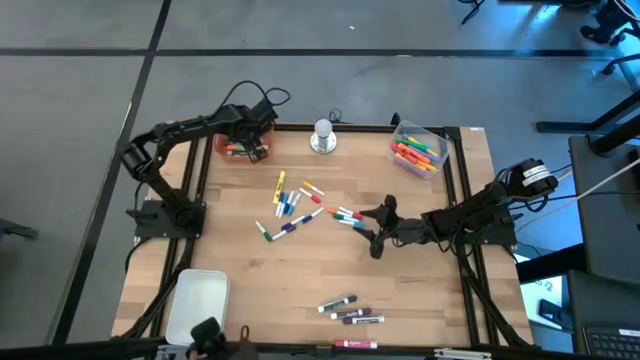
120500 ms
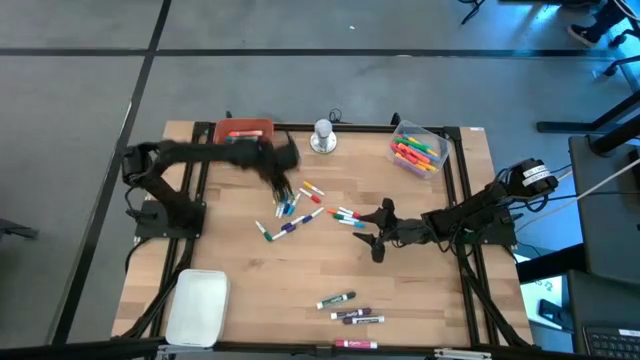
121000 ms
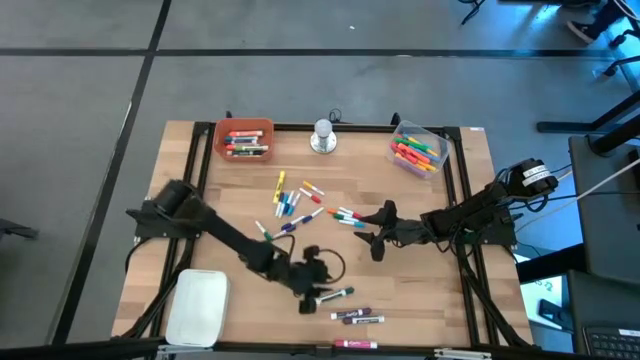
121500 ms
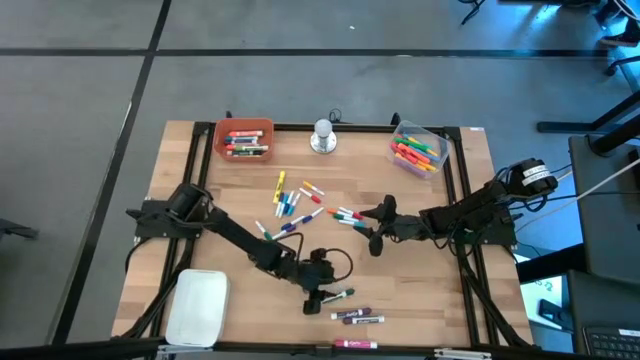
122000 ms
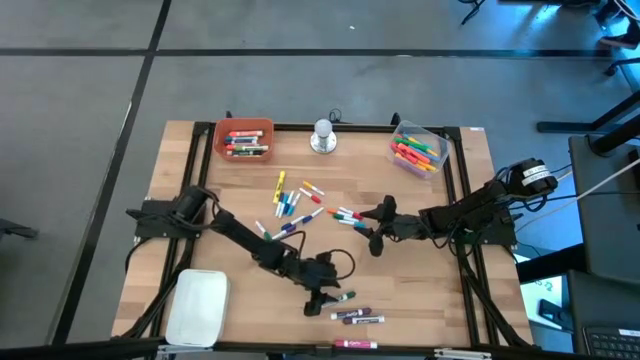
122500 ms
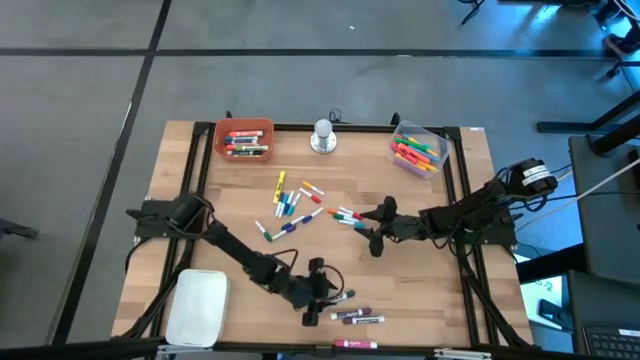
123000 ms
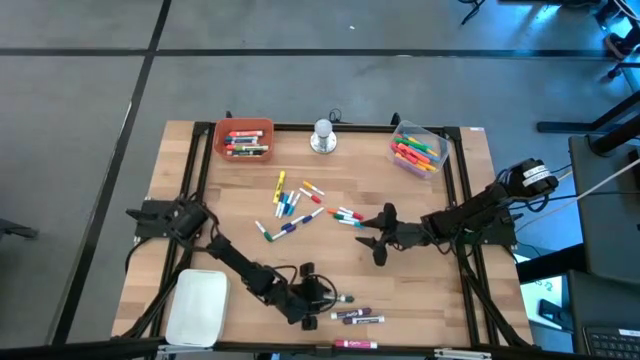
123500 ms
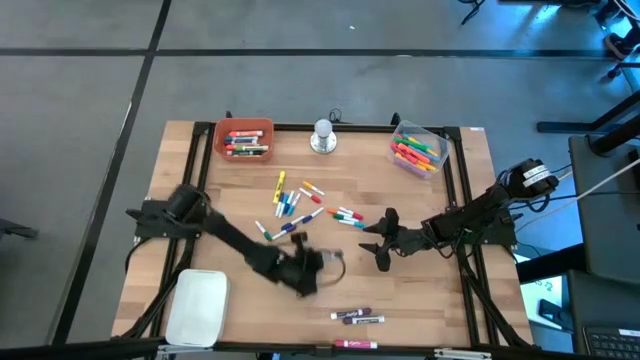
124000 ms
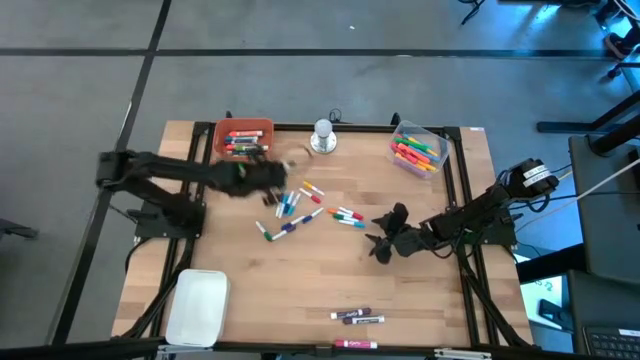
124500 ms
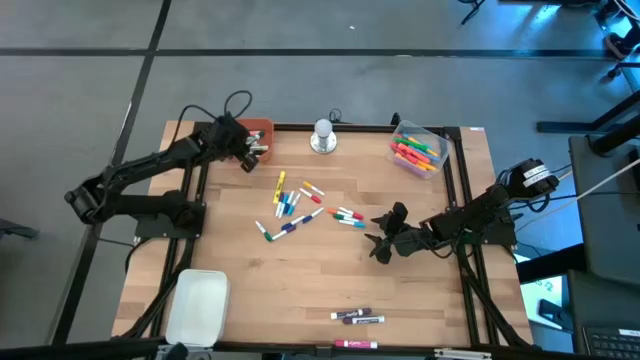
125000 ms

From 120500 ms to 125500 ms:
Task: Pick & Place Markers
Put the green marker pen into the orange bin

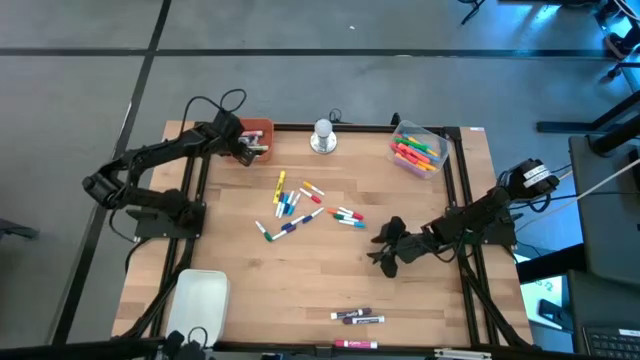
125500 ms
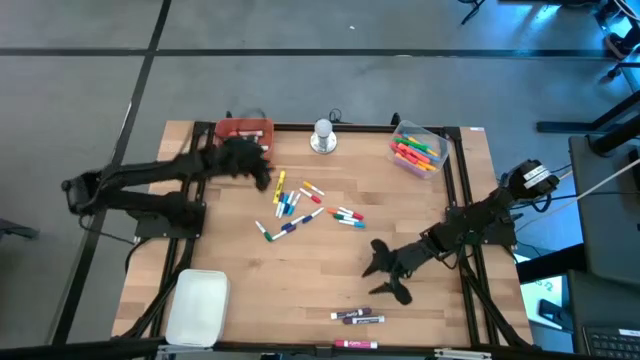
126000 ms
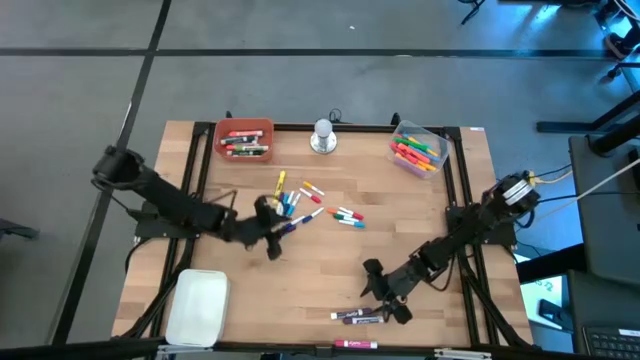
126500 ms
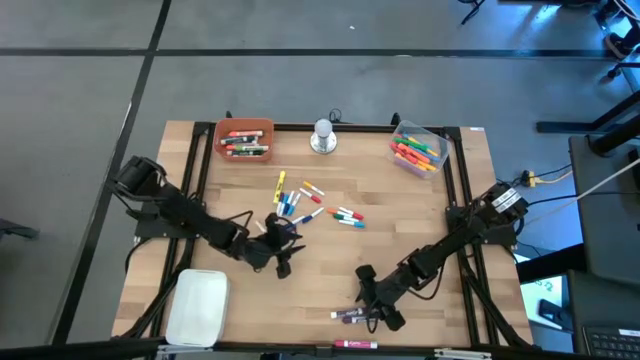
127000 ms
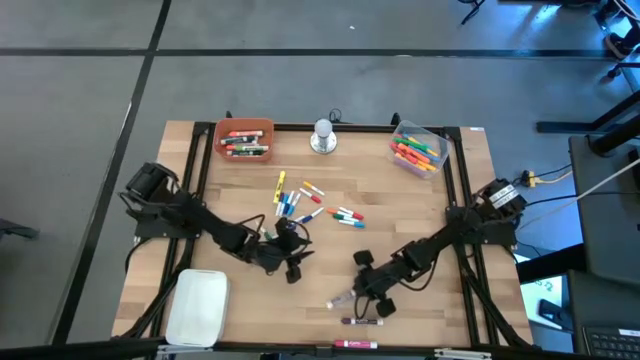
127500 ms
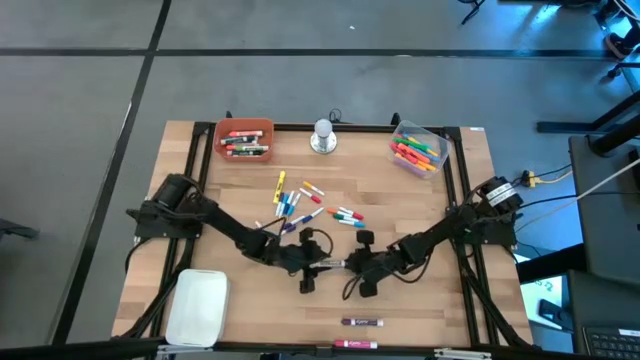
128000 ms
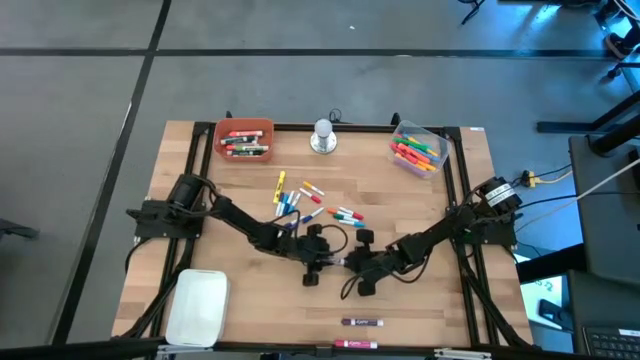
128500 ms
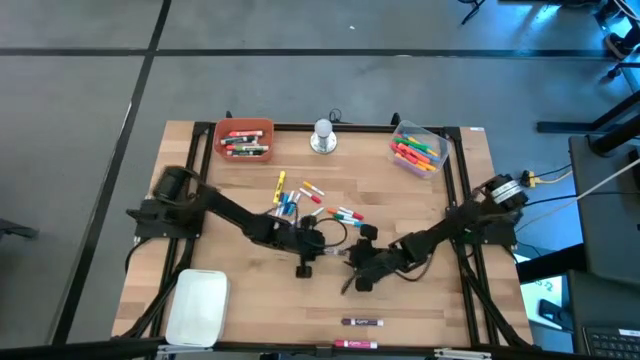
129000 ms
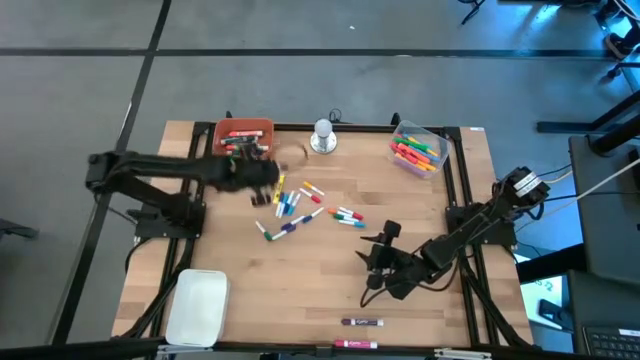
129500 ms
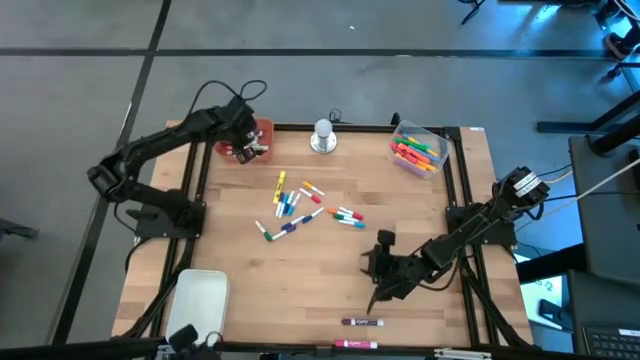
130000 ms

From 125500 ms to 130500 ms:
Put the purple marker pen into the orange bin

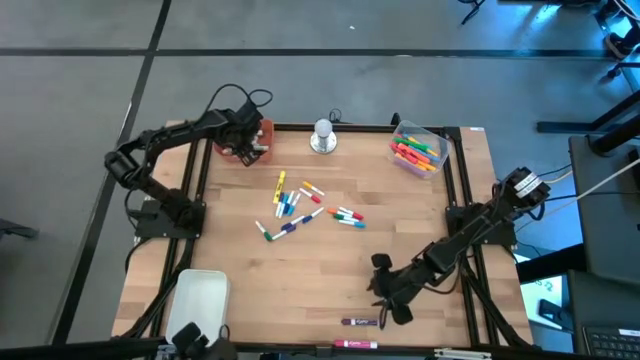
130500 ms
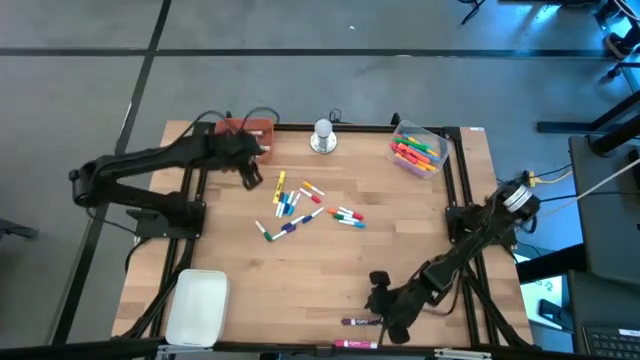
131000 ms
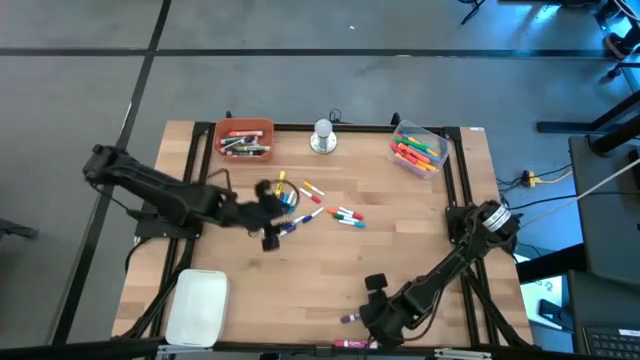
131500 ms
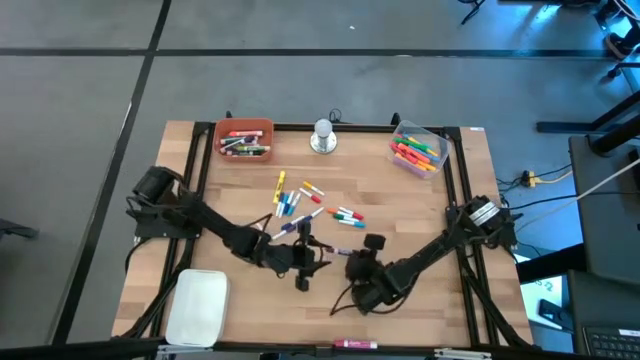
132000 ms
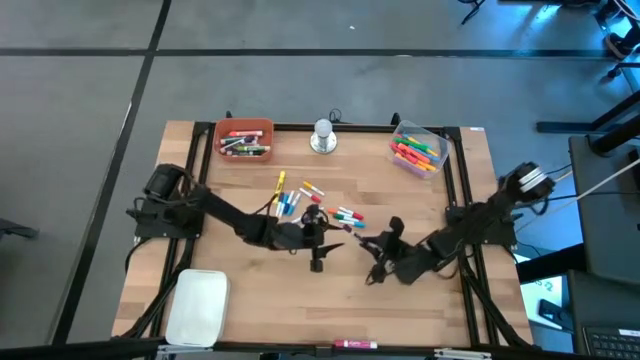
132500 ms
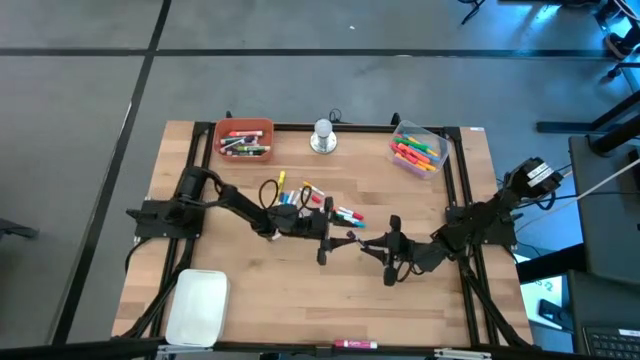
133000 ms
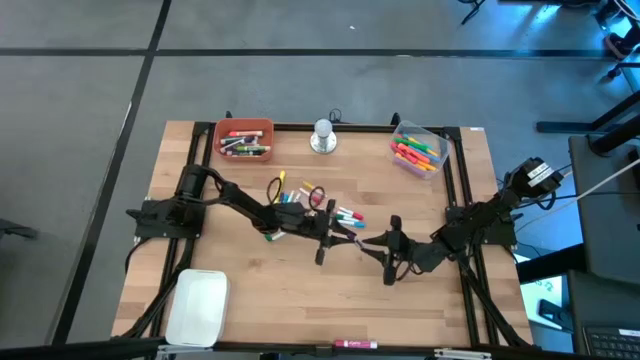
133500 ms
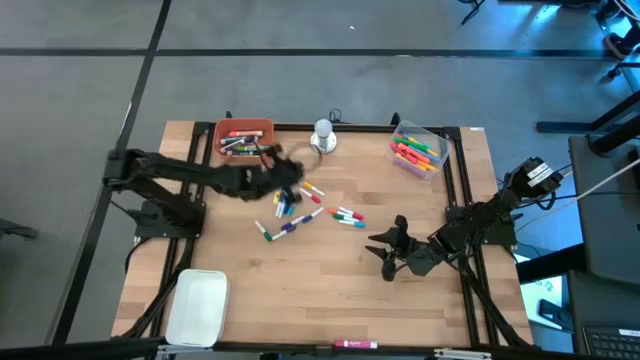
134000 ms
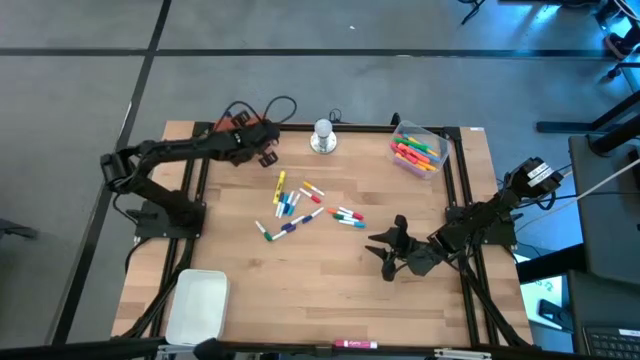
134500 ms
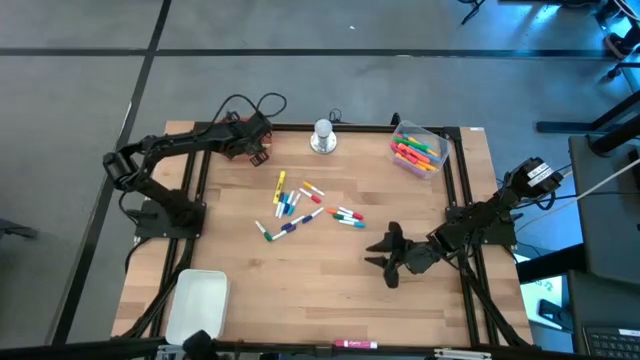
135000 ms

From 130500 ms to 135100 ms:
Put the purple marker pen into the orange bin

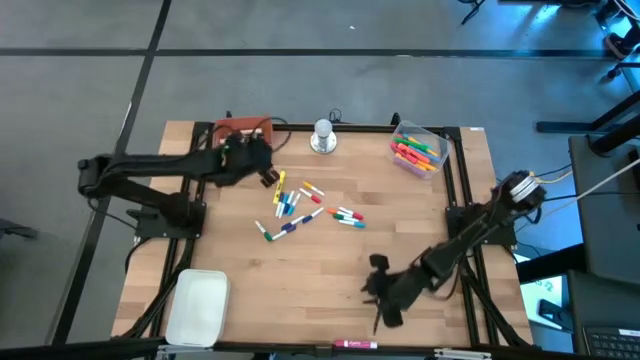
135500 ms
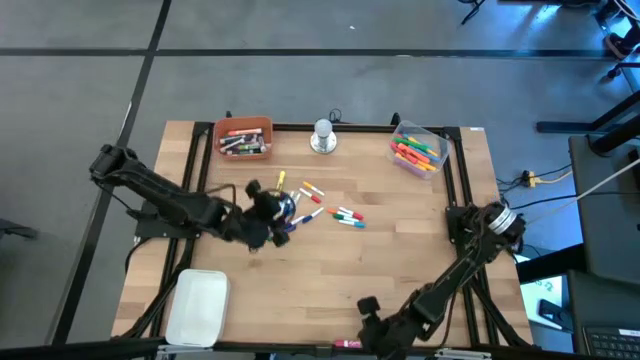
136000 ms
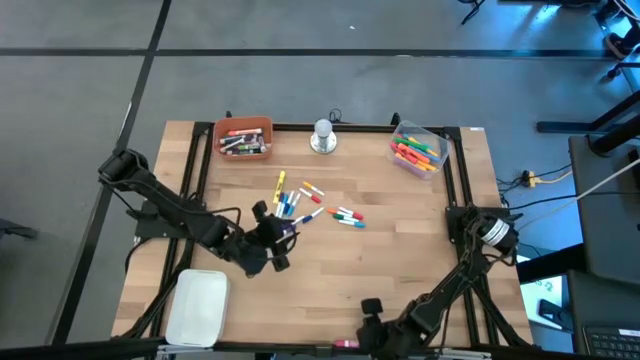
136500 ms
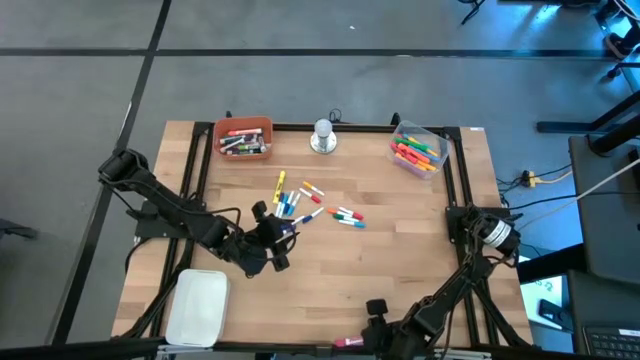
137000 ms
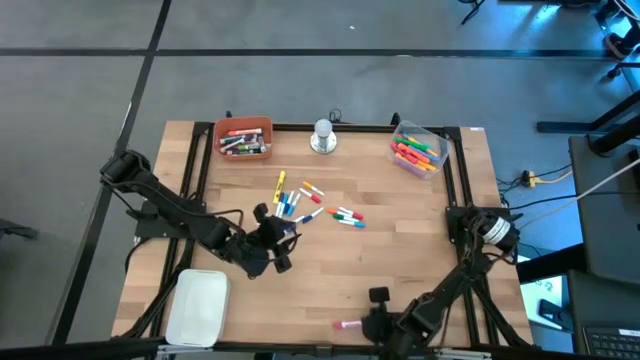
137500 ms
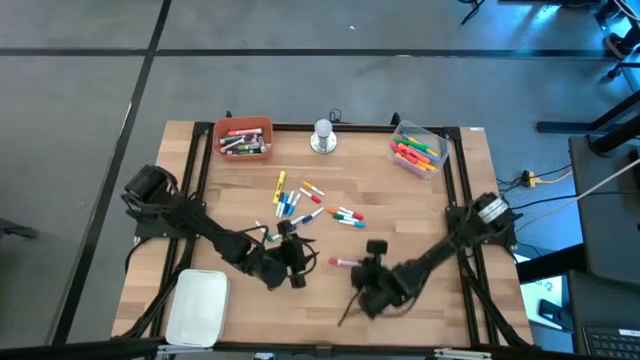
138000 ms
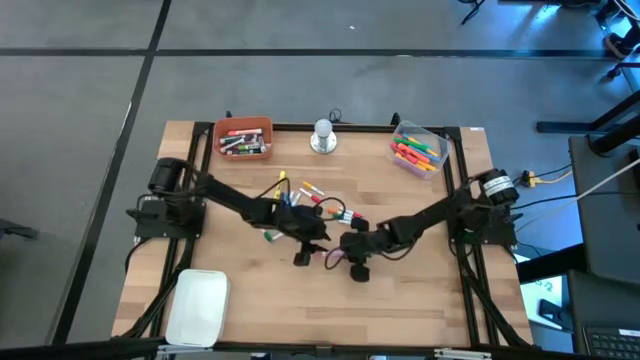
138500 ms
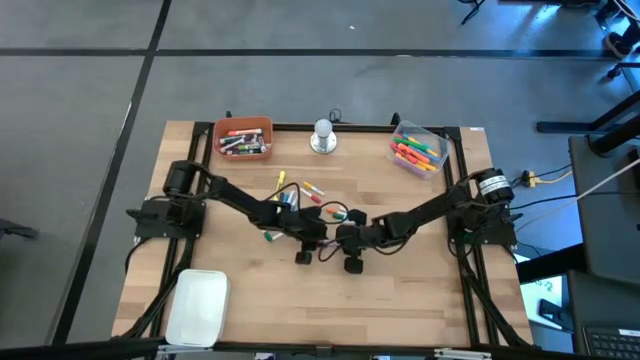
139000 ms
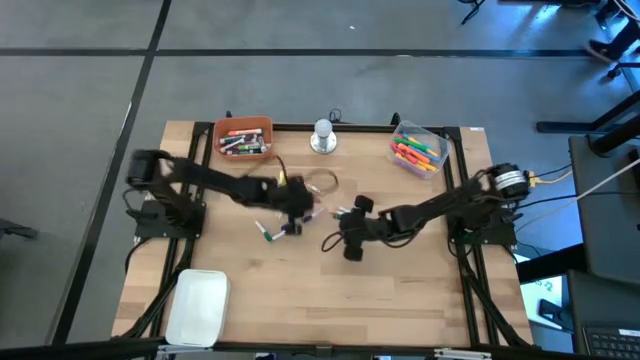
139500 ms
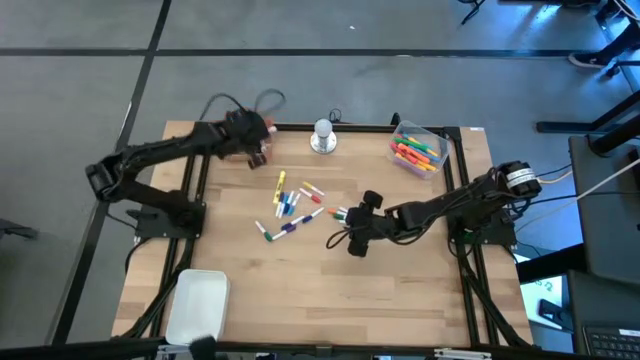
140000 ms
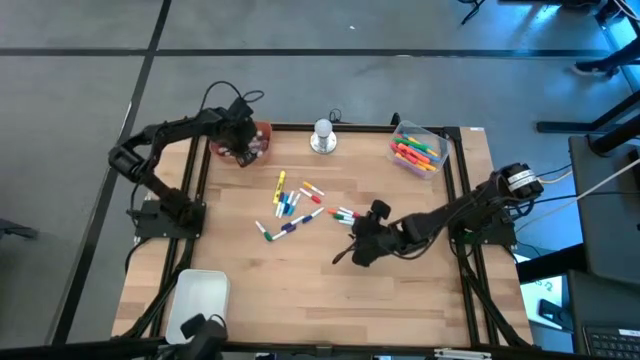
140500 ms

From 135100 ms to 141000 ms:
Put the pink marker pen into the orange bin

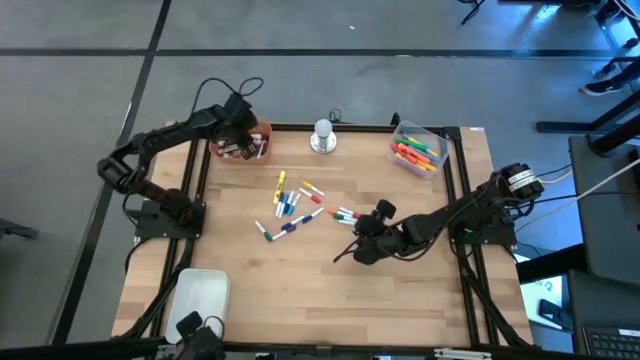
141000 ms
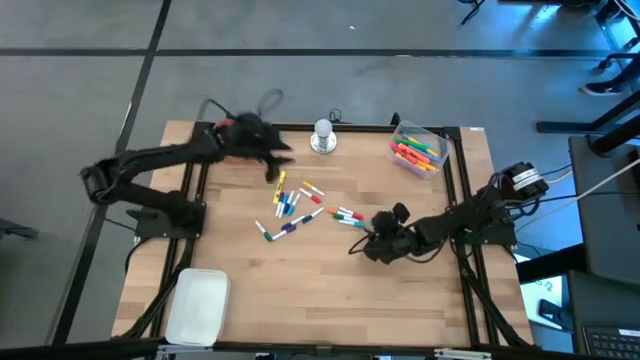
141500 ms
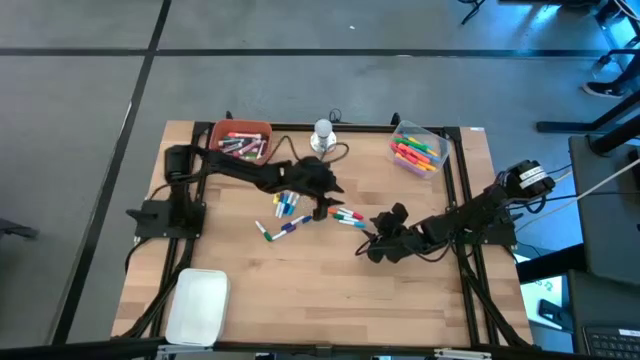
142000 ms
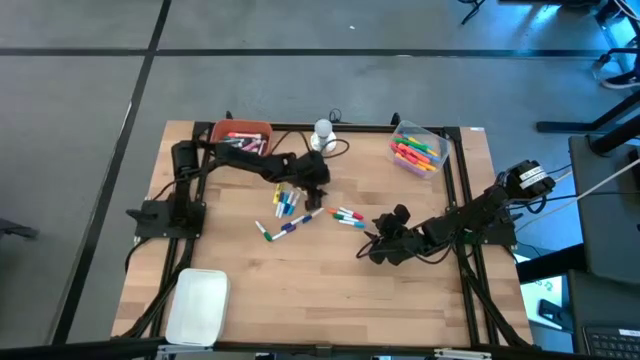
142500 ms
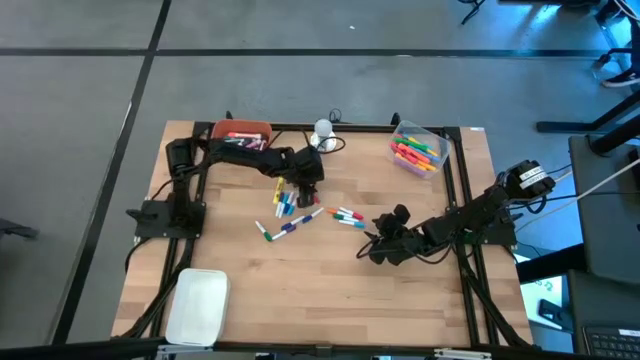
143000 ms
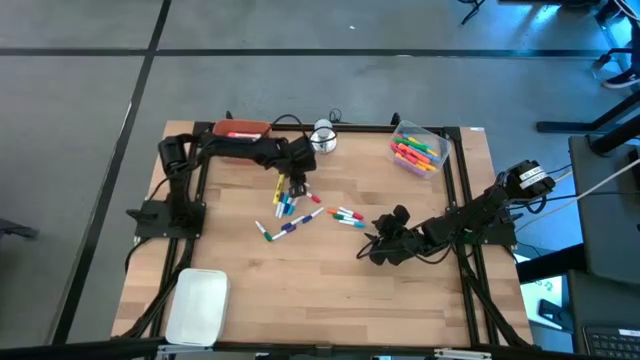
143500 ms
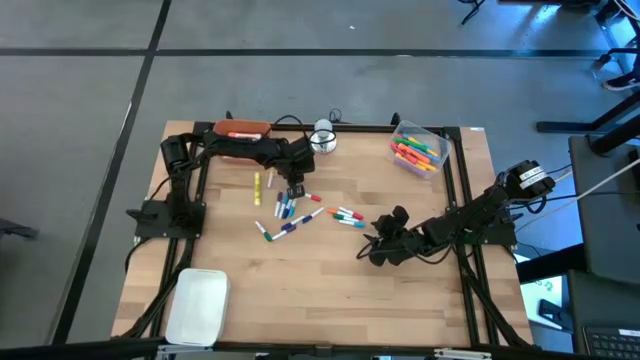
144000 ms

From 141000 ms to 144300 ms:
Put the small yellow highlighter pen into the white bin
